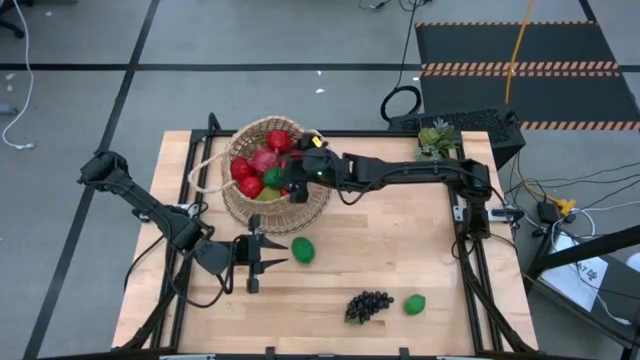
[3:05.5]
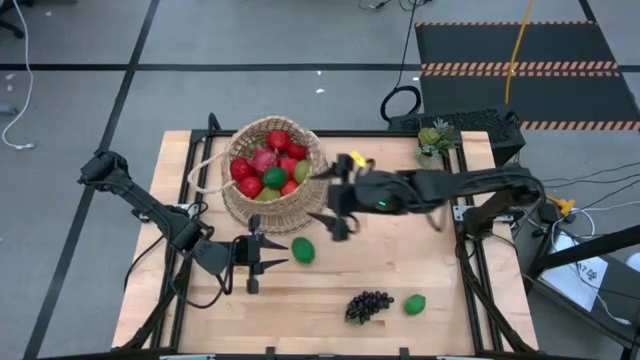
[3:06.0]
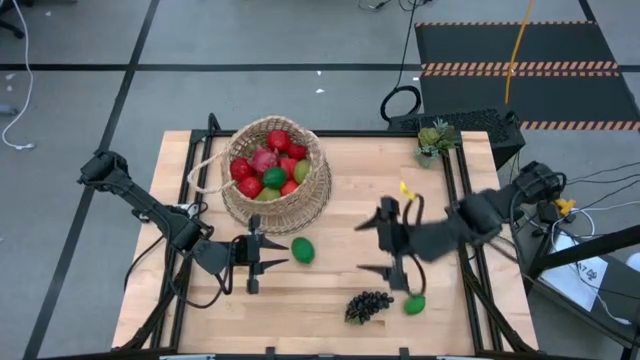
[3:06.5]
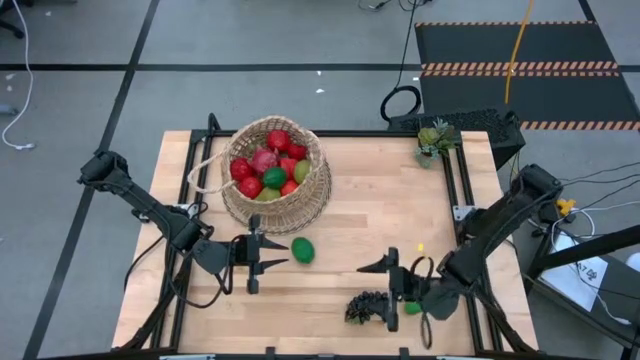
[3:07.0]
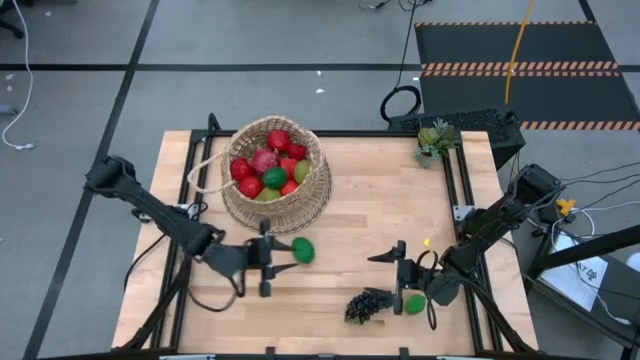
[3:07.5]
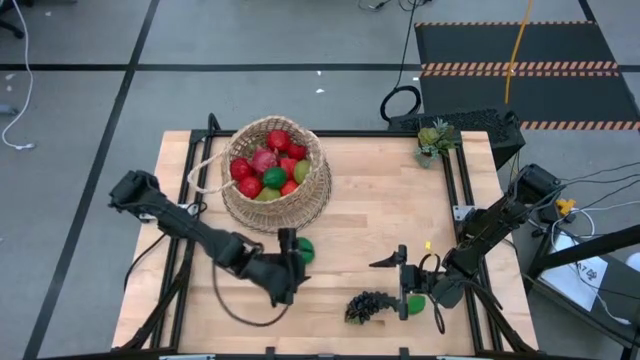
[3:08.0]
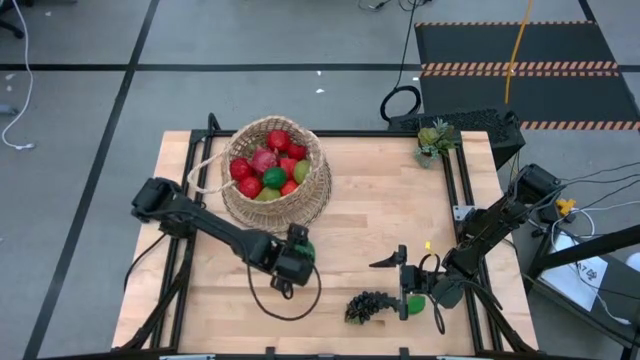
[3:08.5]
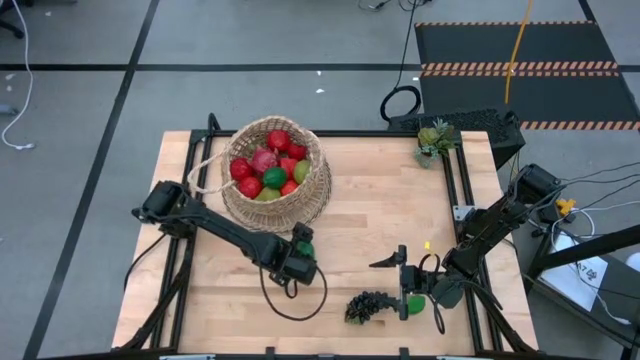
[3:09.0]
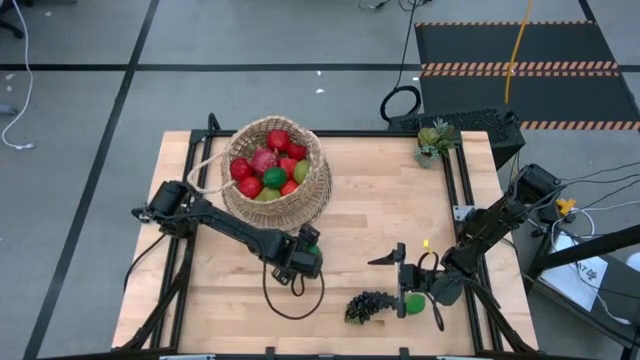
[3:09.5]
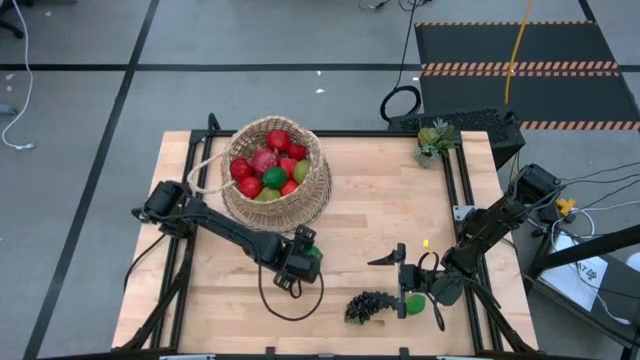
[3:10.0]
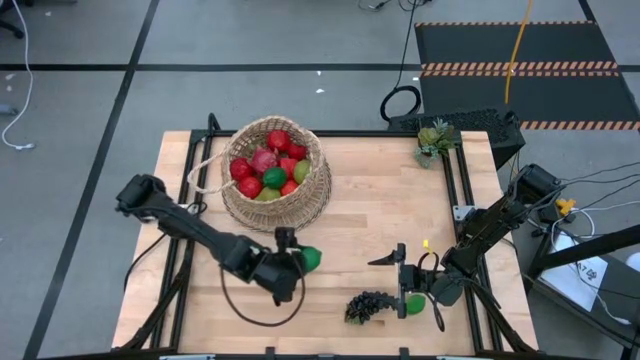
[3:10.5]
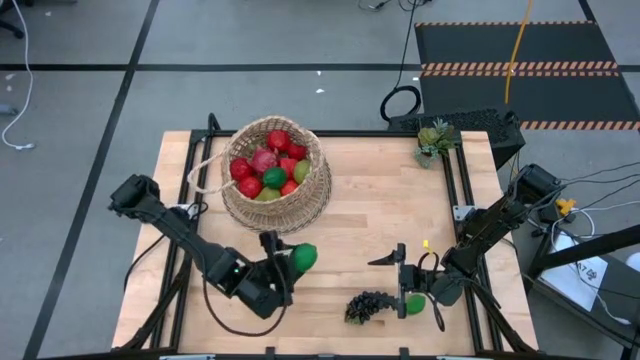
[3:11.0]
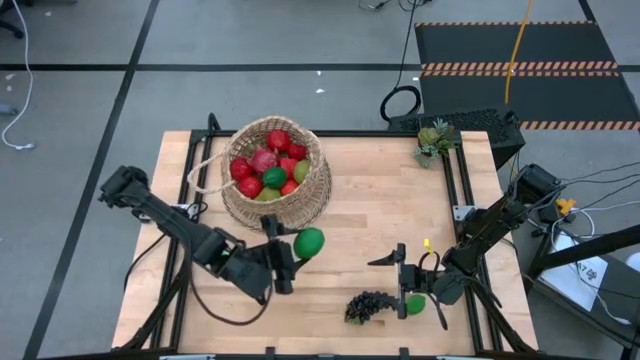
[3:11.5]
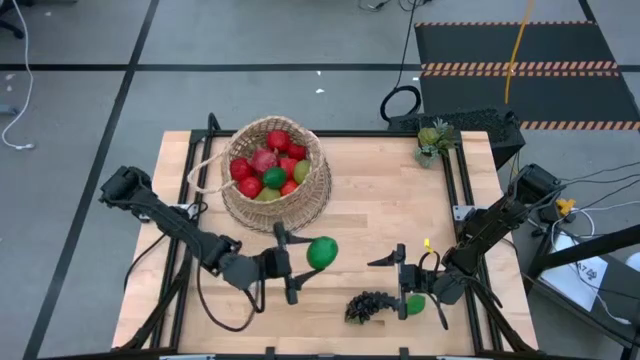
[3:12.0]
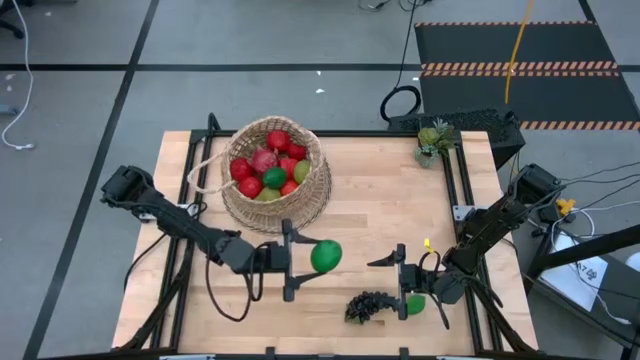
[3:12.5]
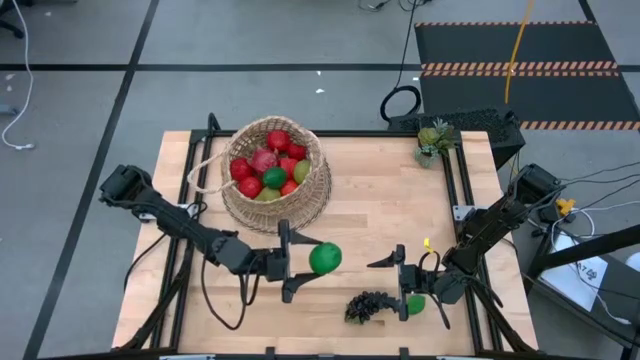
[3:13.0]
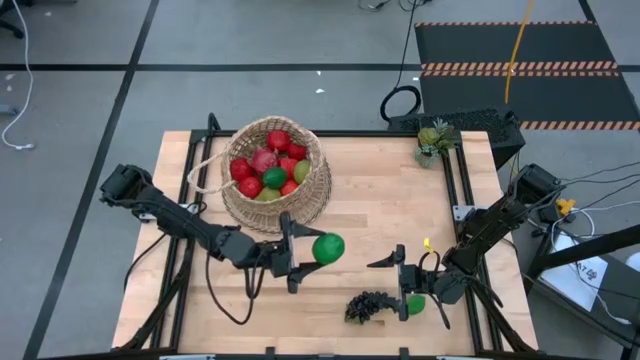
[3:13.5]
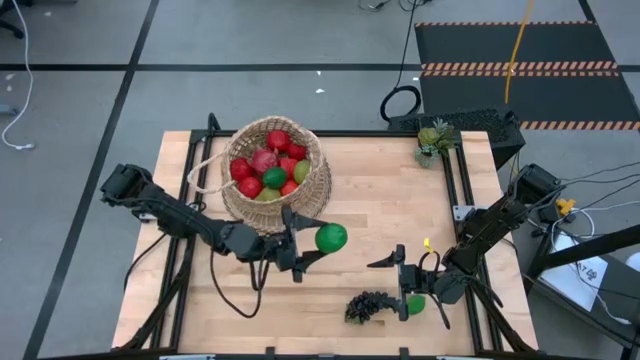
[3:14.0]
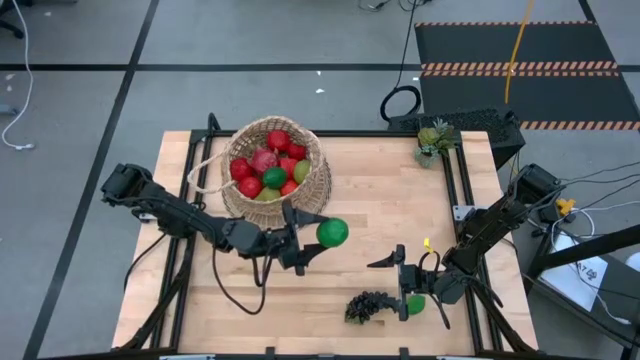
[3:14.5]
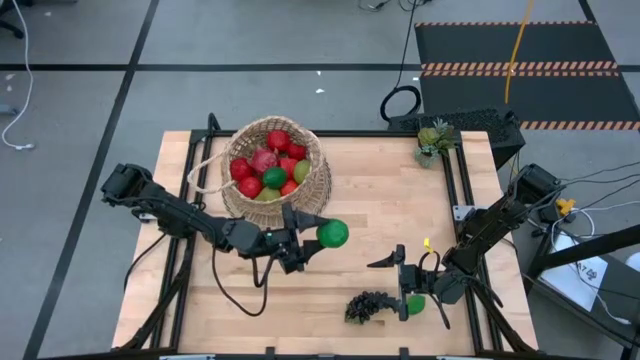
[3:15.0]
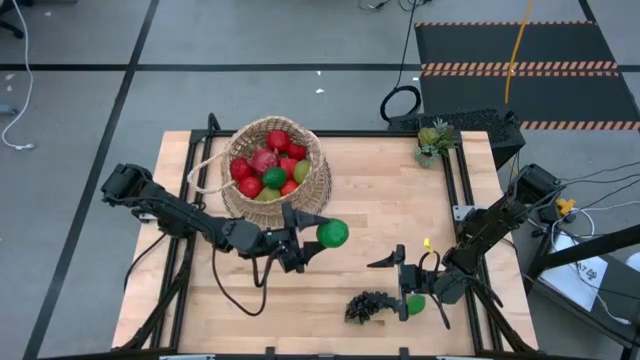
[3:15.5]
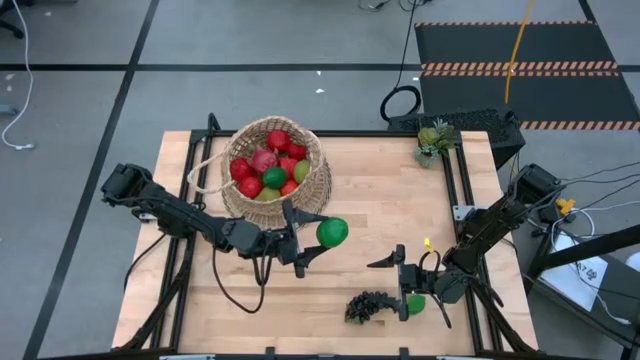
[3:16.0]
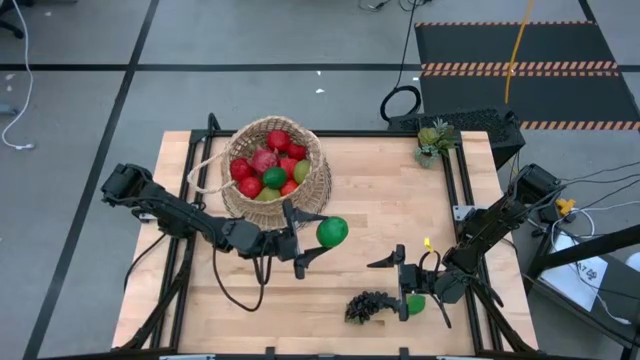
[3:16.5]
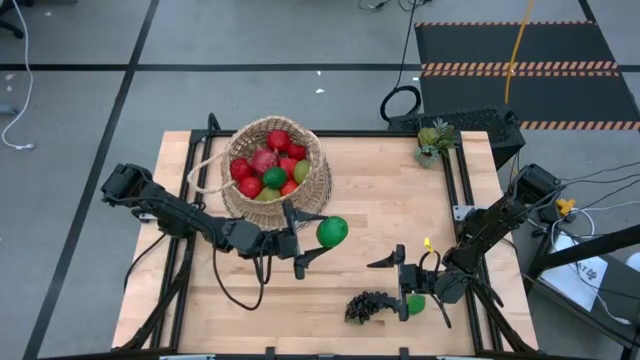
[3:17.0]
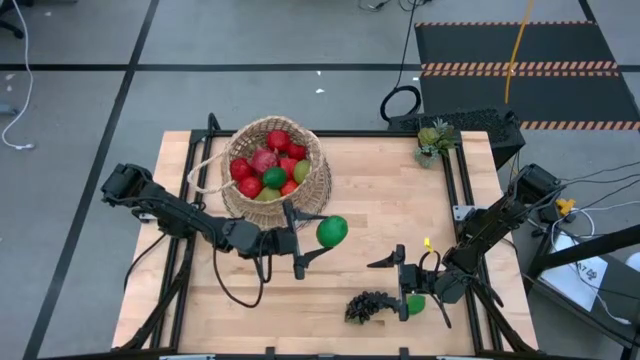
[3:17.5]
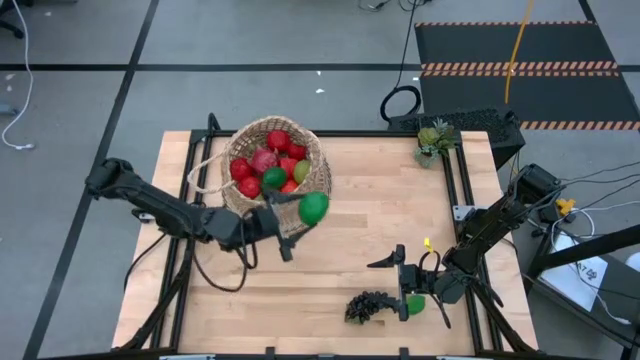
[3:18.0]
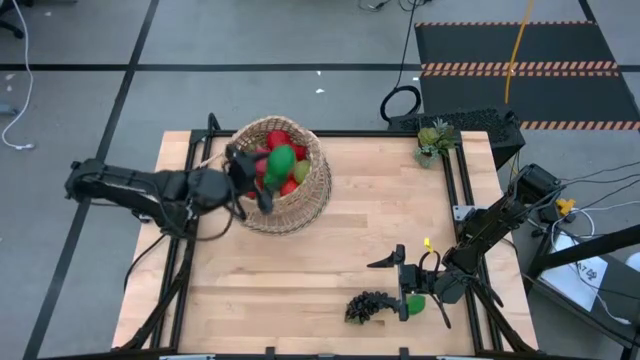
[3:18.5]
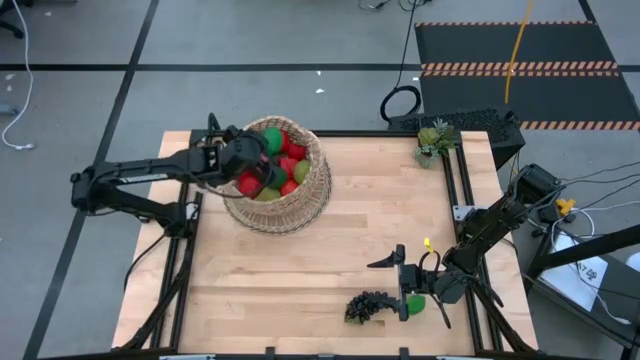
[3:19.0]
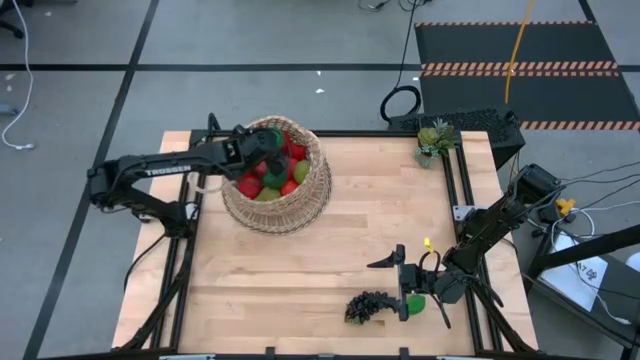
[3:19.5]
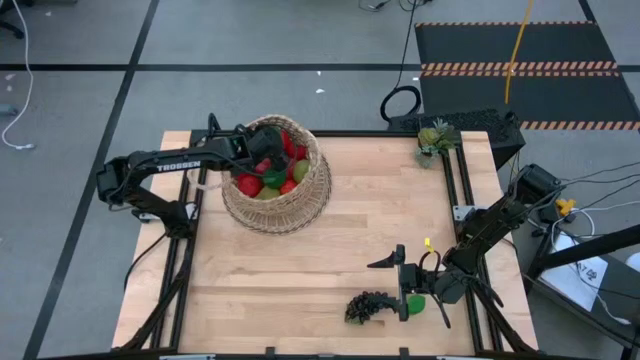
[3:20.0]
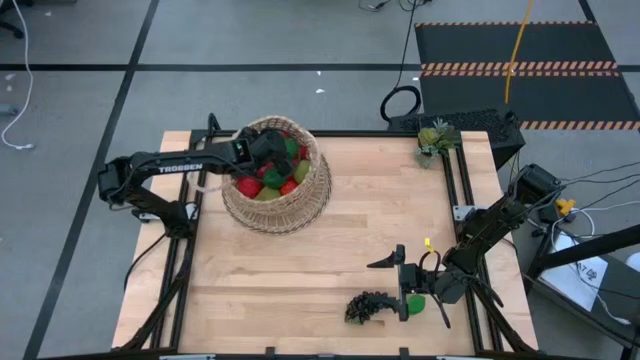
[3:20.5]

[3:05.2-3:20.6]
Task: Build produce basket
Put the top lime into the basket

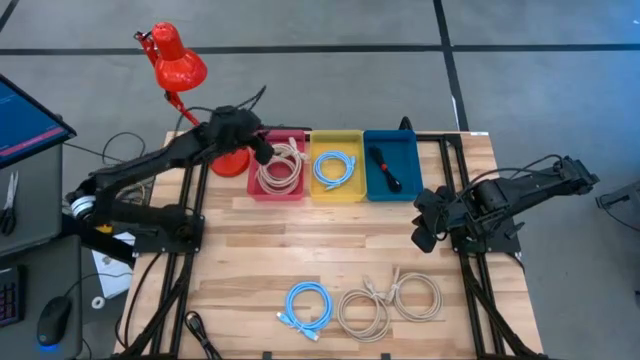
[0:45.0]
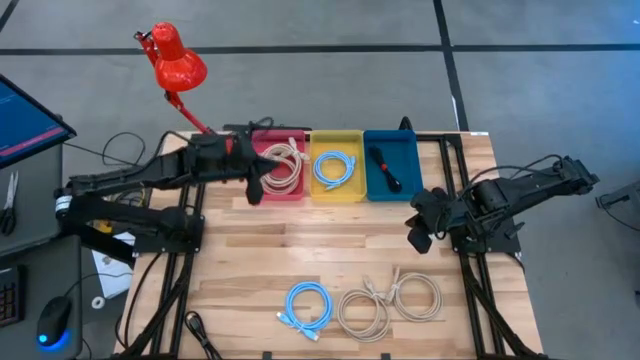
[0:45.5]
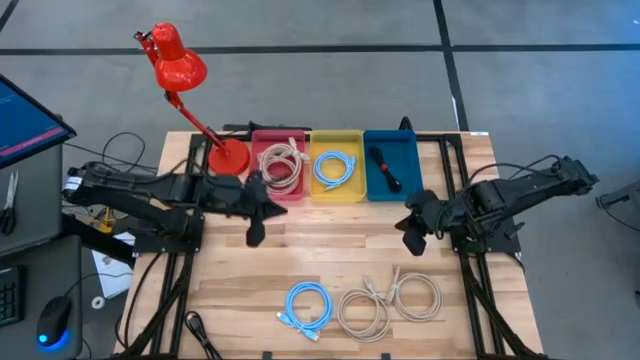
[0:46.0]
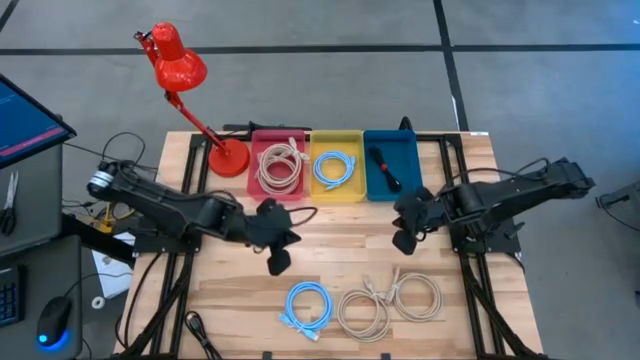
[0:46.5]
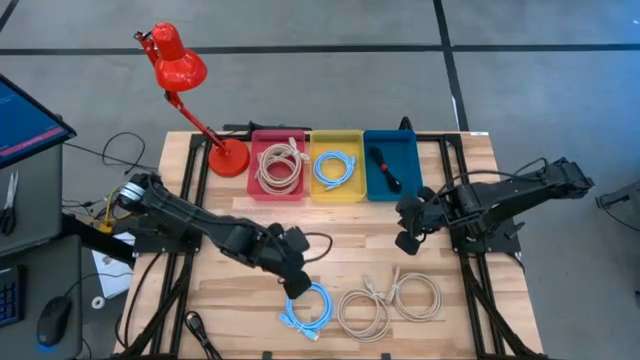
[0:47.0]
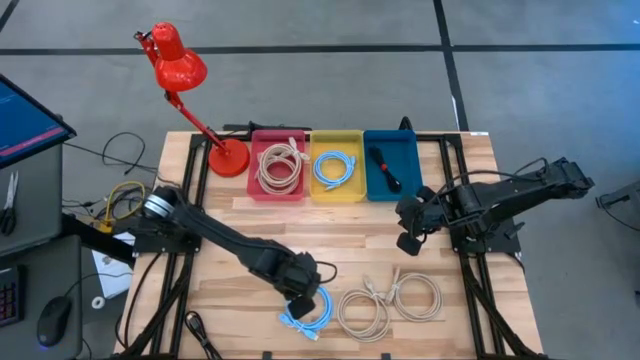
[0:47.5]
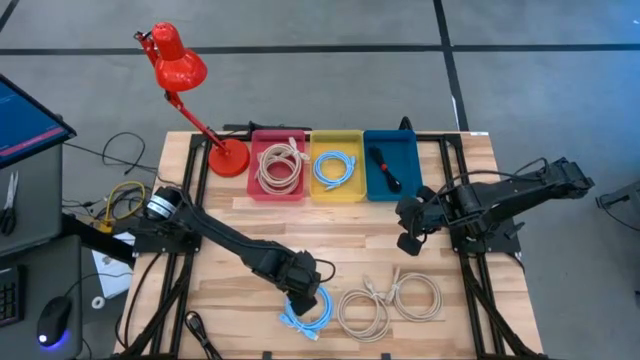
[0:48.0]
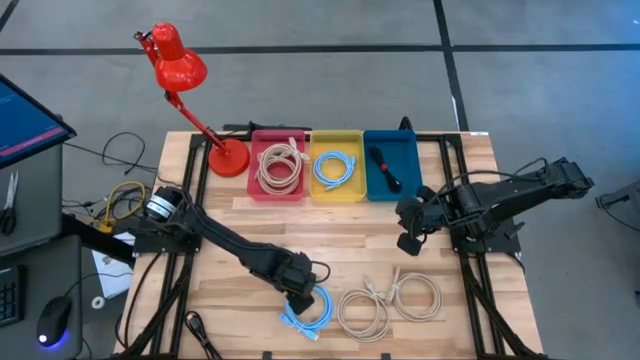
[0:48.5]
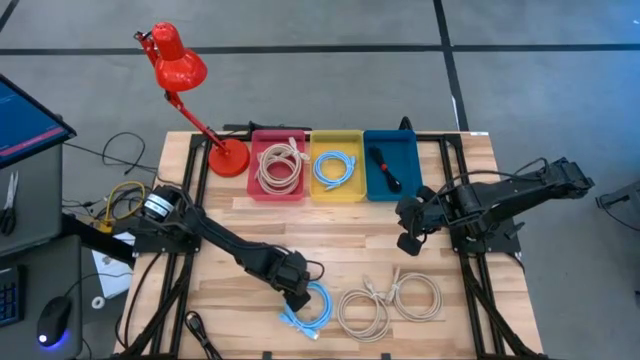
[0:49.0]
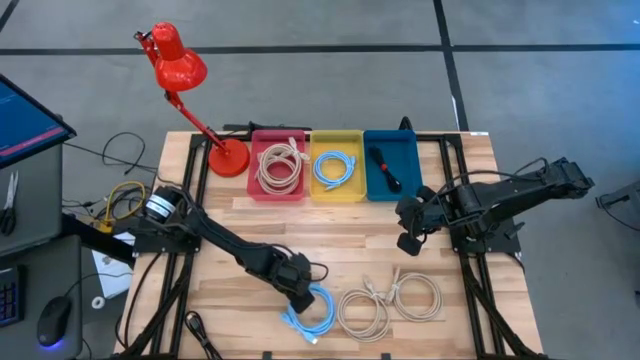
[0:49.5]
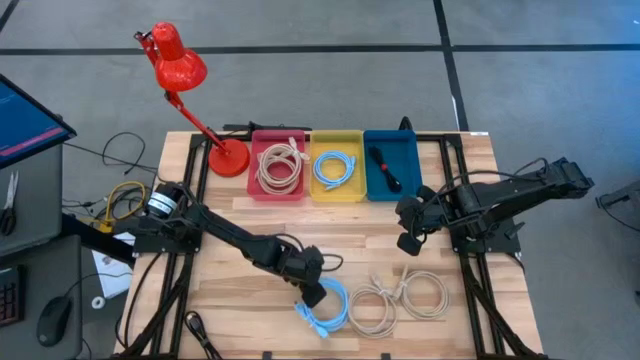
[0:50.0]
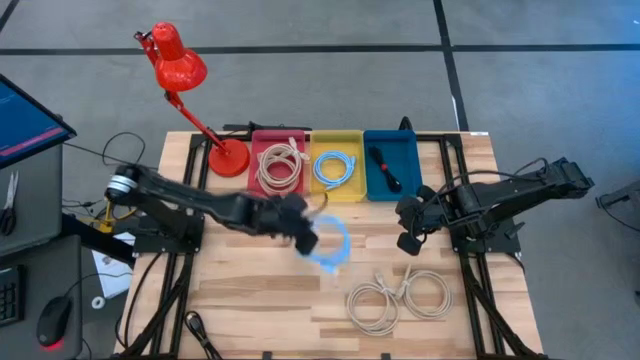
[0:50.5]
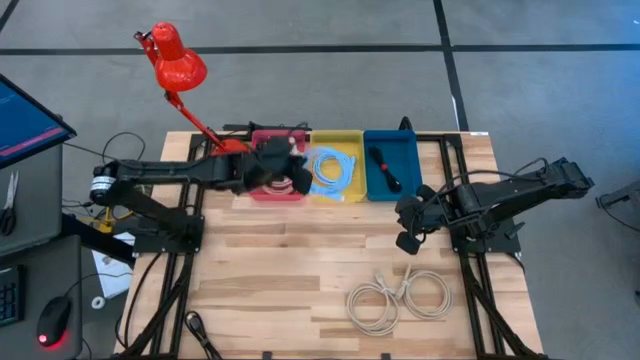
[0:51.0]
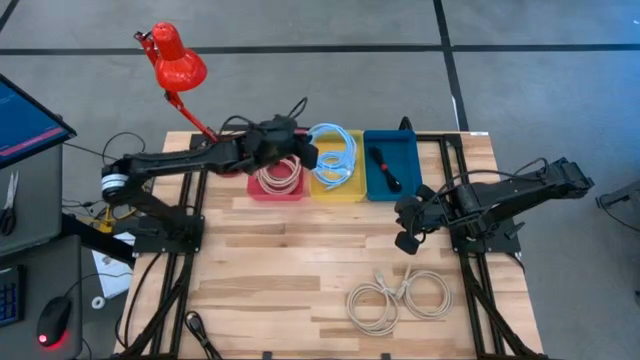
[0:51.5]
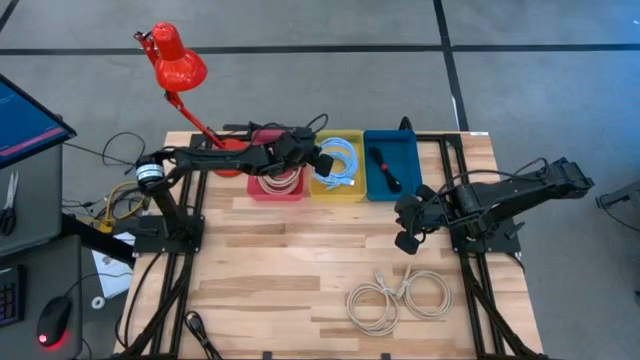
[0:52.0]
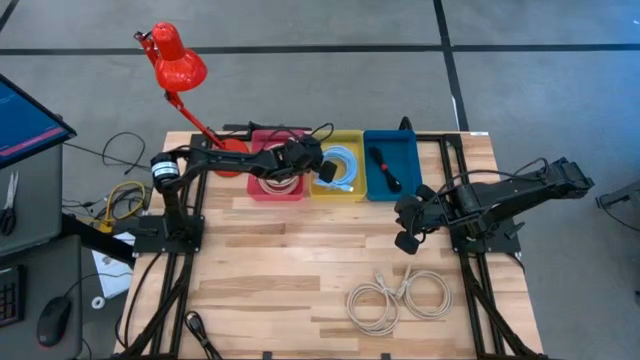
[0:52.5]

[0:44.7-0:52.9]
Task: Pick & Place USB Port
Put the bottom blue charger cable into the yellow bin
